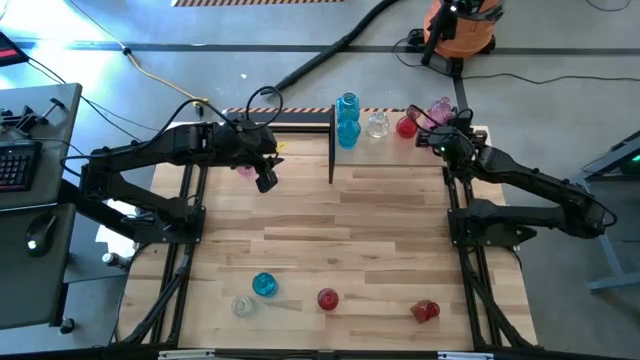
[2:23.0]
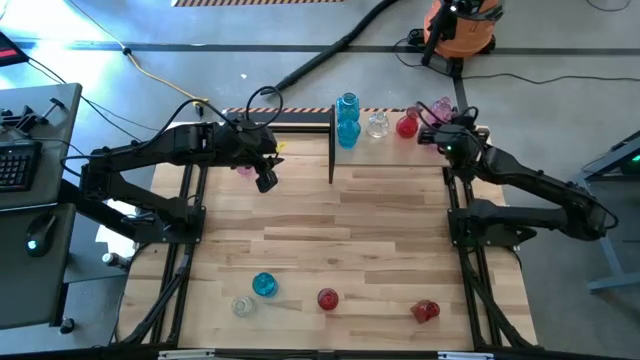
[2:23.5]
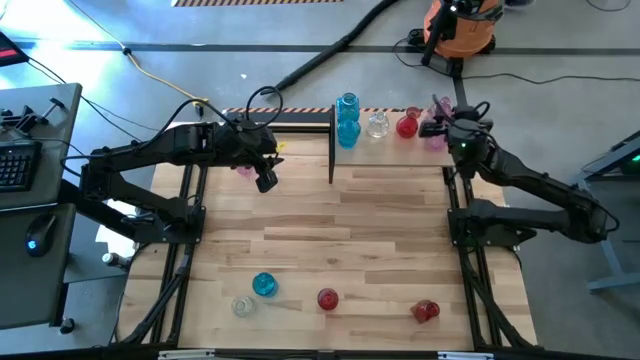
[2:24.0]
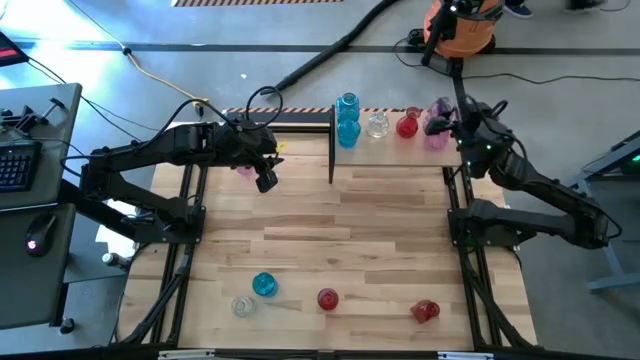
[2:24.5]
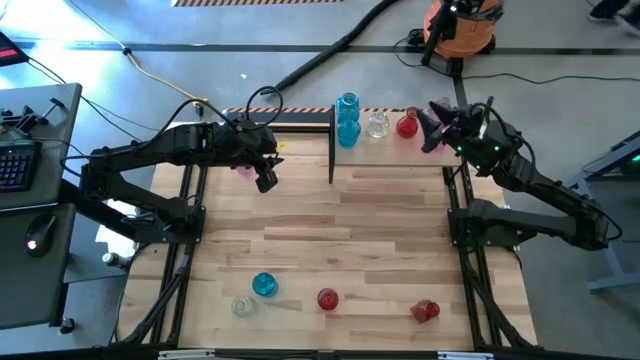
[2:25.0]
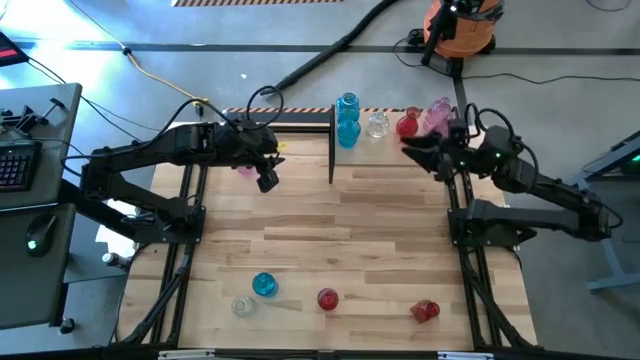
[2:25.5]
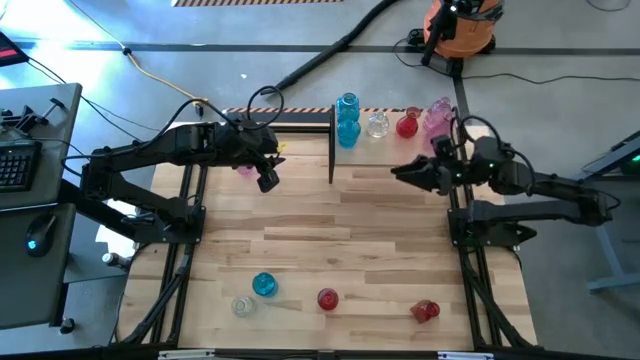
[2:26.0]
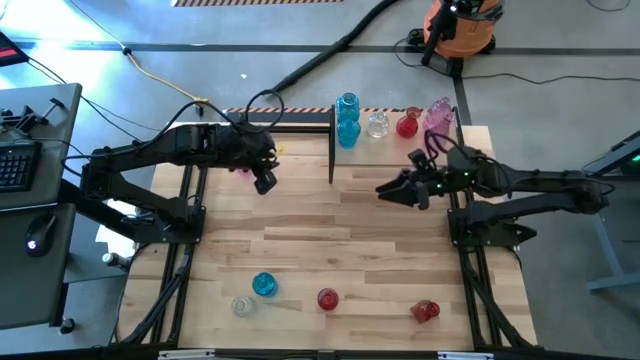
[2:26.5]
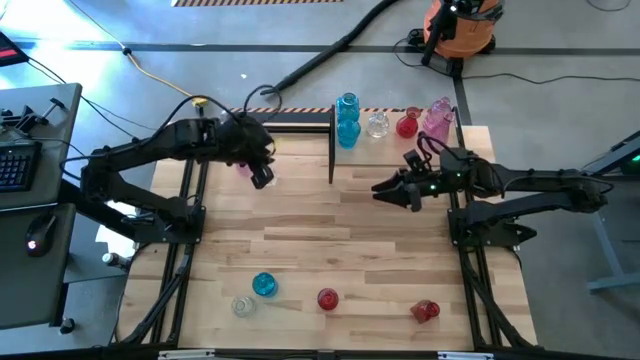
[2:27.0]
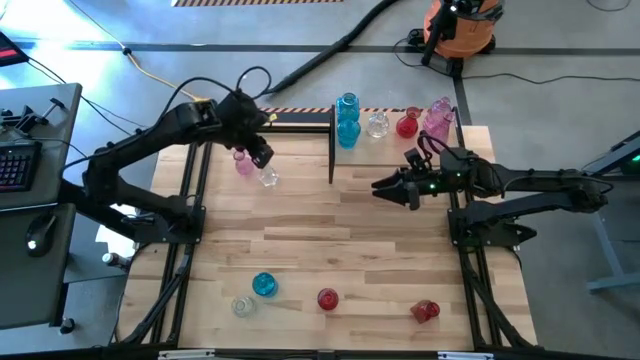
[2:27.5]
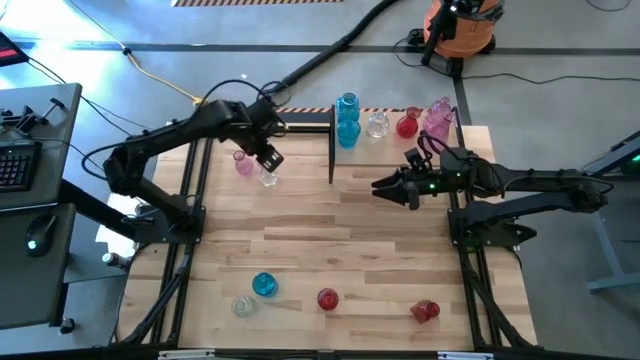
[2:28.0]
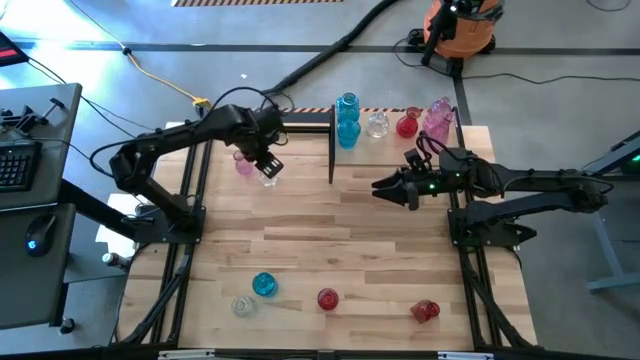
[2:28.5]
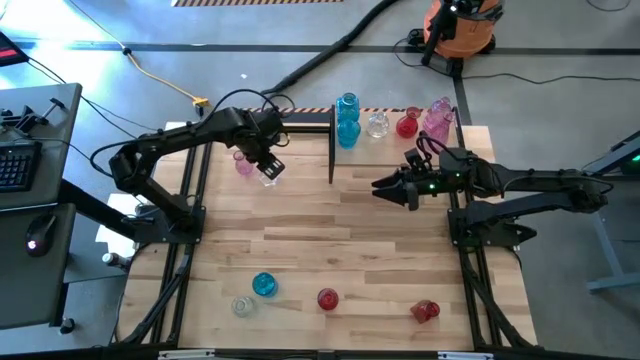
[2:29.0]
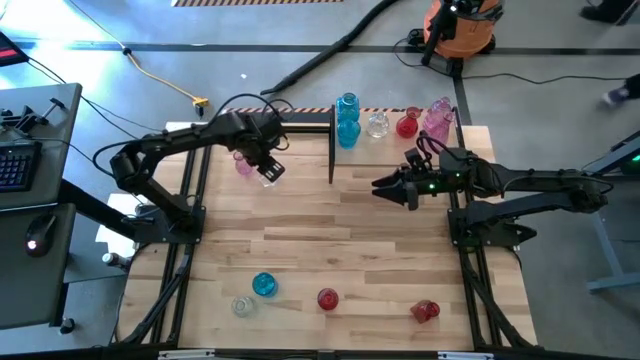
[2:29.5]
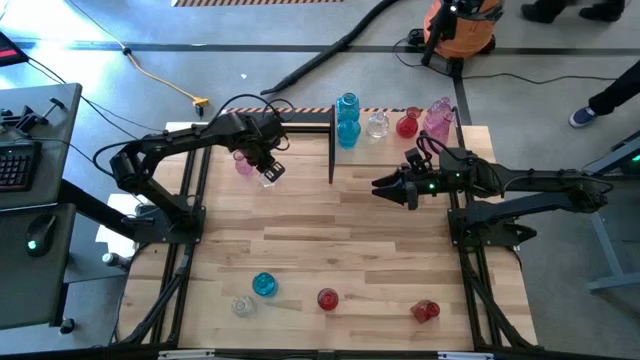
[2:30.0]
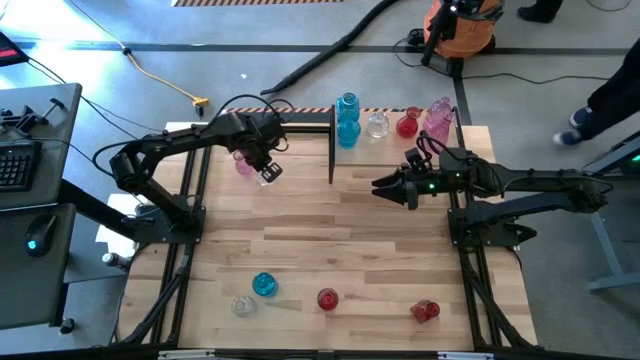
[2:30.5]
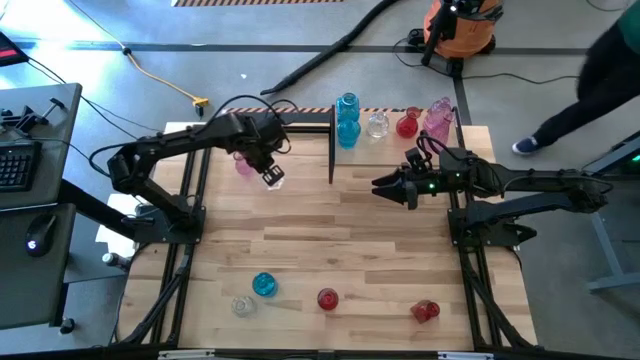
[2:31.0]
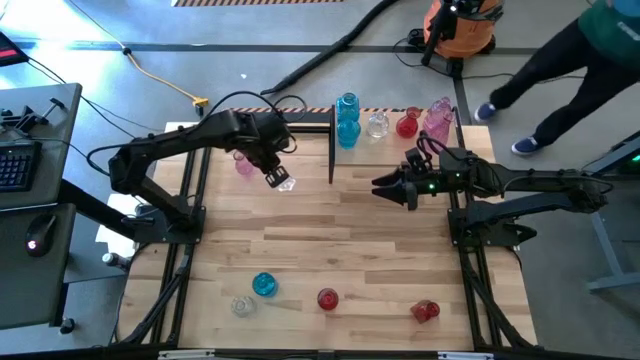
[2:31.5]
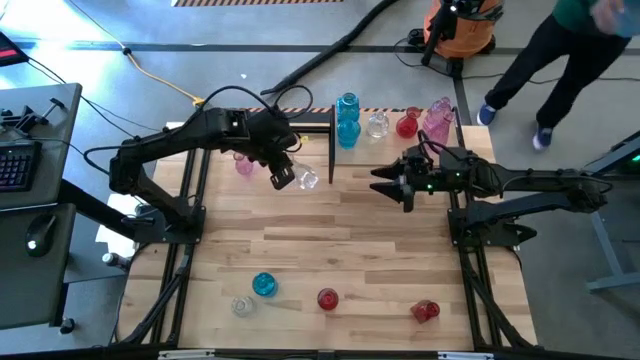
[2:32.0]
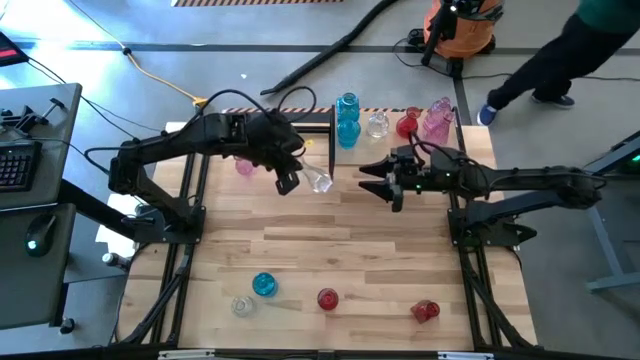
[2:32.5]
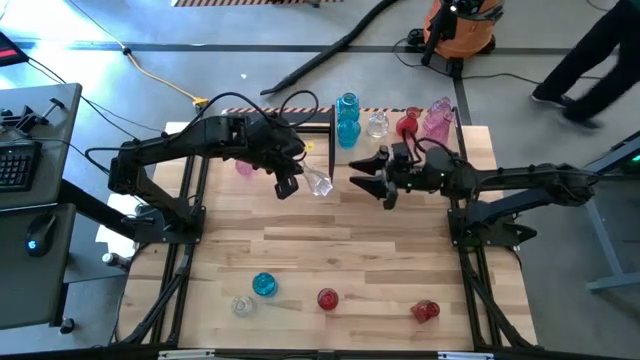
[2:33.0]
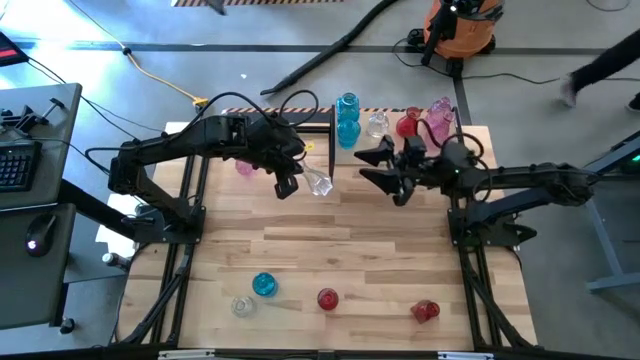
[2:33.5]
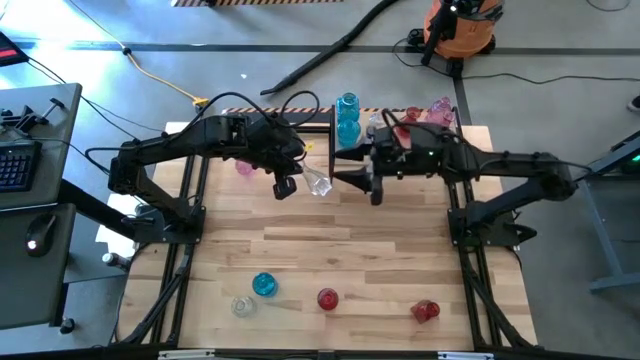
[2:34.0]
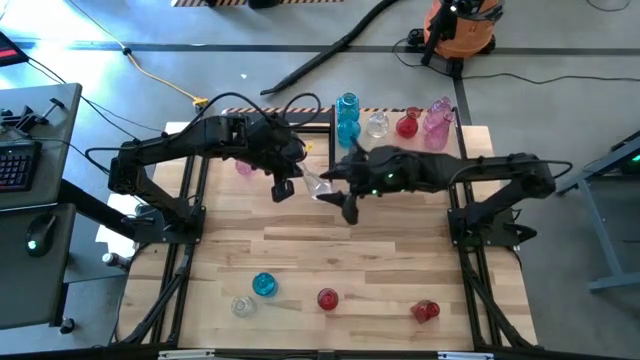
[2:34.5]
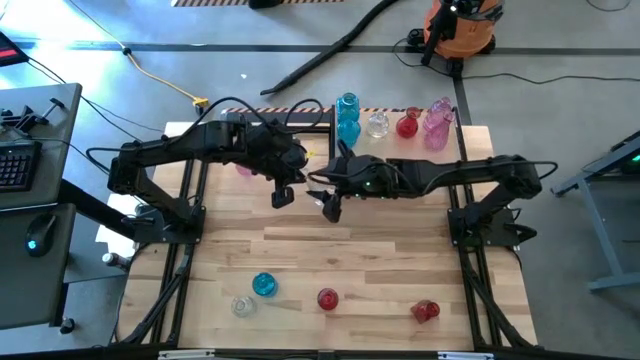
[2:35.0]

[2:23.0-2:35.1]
Task: sort vases onto shelf
Put the top transparent vase on the shelf aligned with the other transparent vase

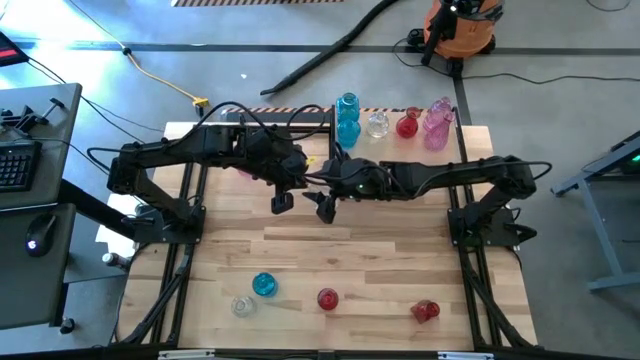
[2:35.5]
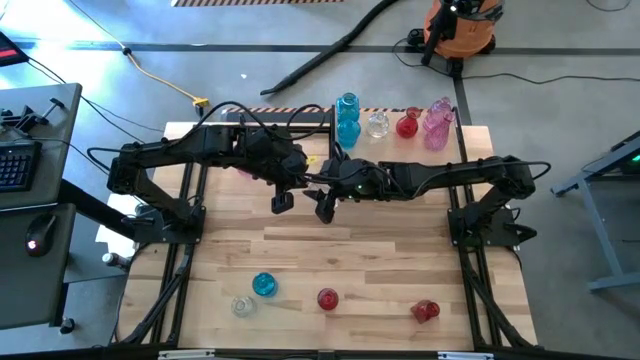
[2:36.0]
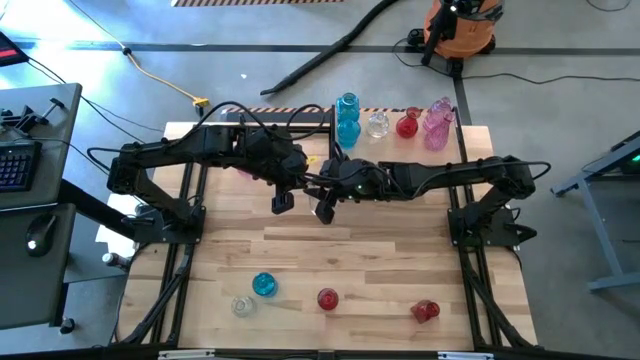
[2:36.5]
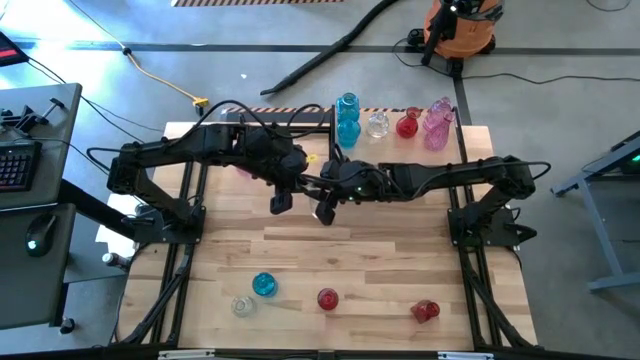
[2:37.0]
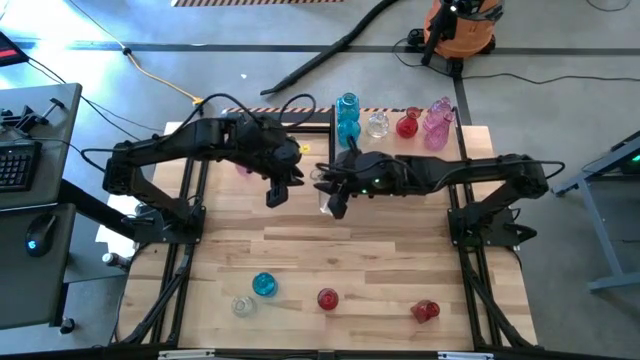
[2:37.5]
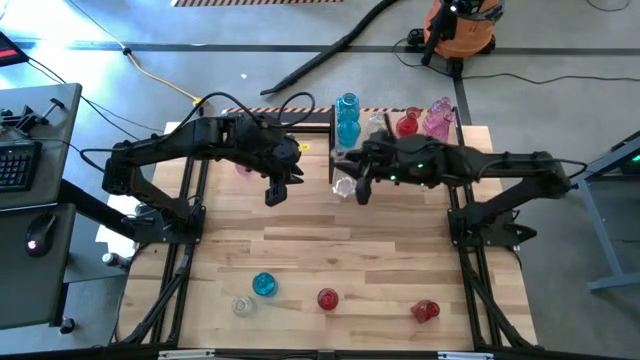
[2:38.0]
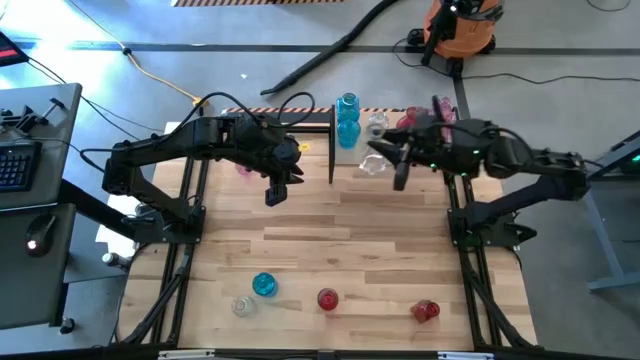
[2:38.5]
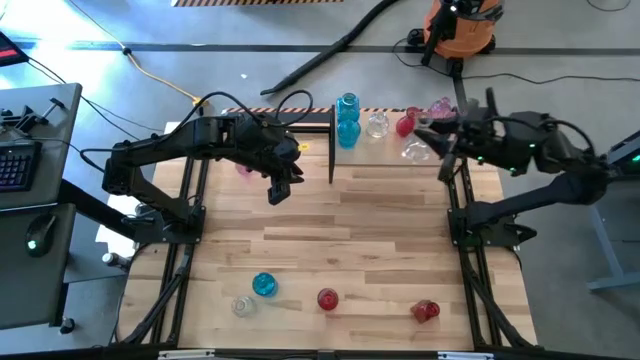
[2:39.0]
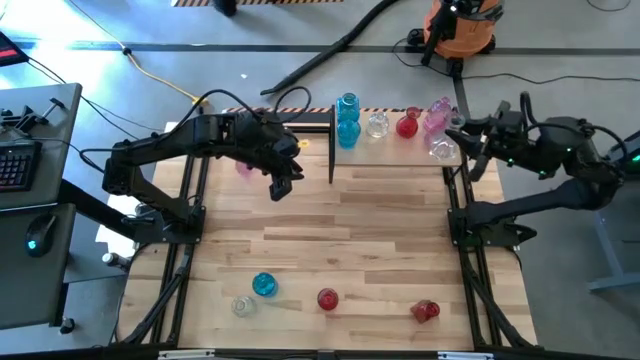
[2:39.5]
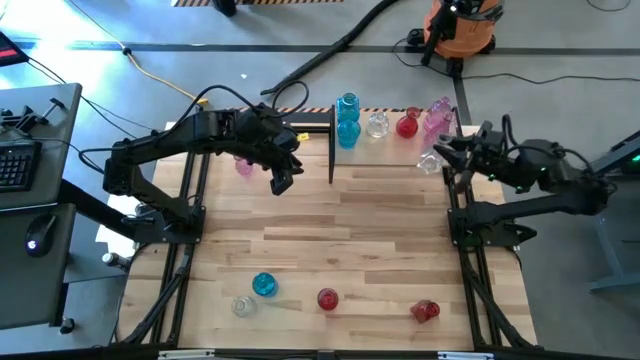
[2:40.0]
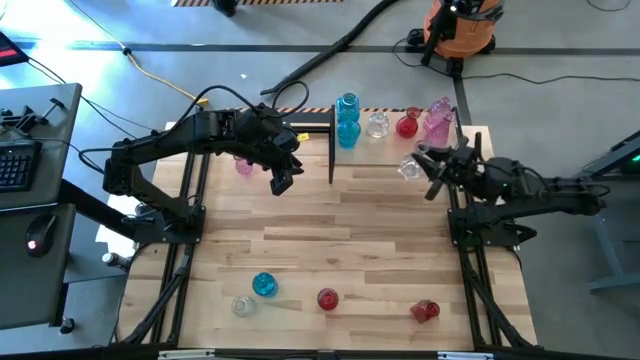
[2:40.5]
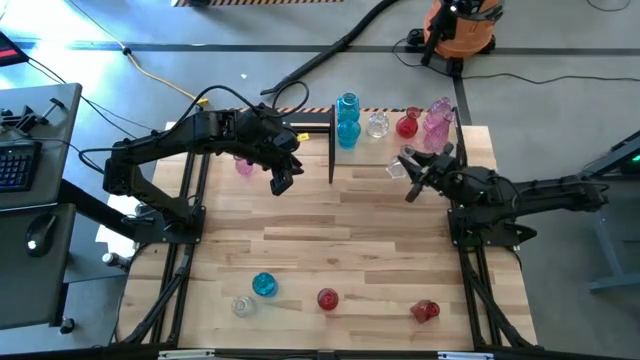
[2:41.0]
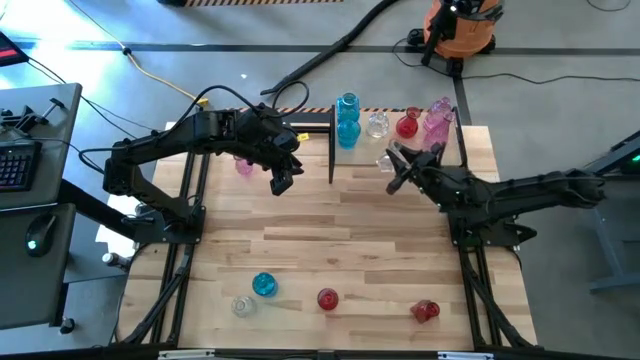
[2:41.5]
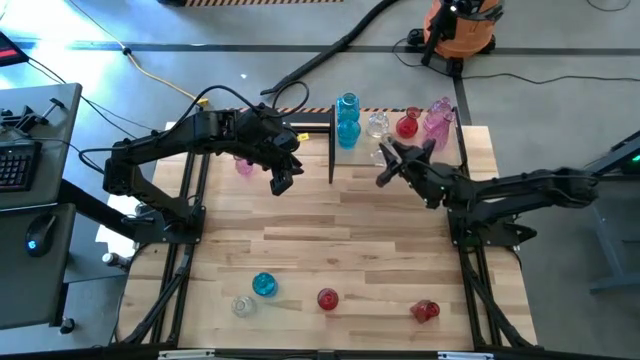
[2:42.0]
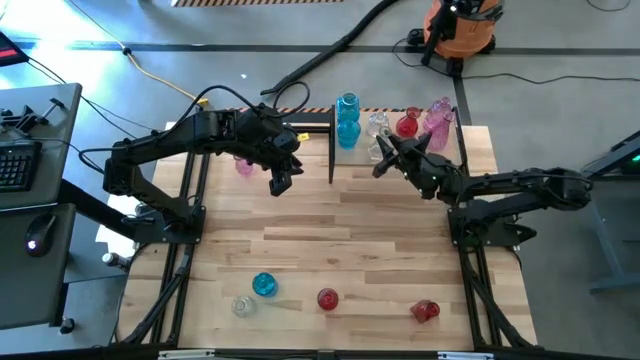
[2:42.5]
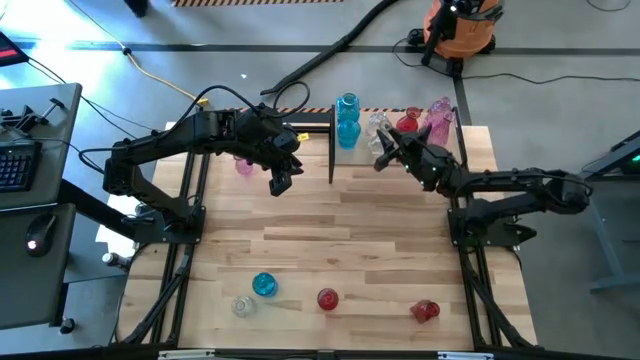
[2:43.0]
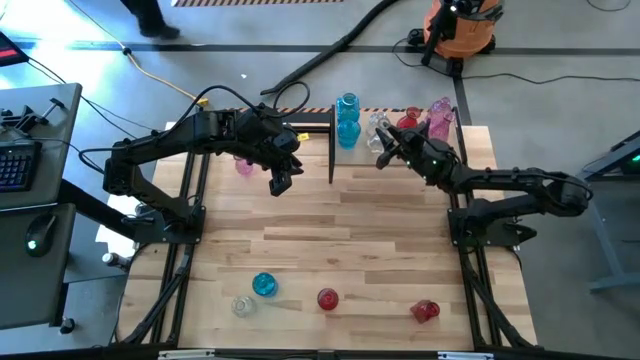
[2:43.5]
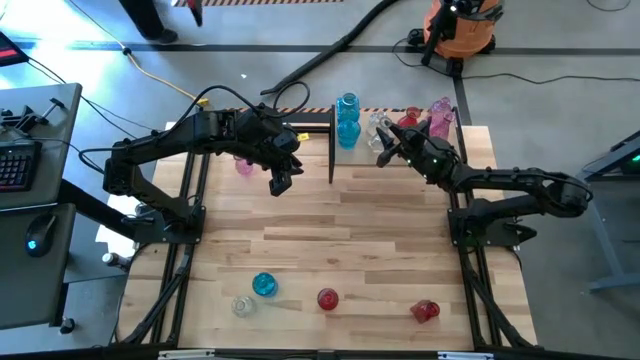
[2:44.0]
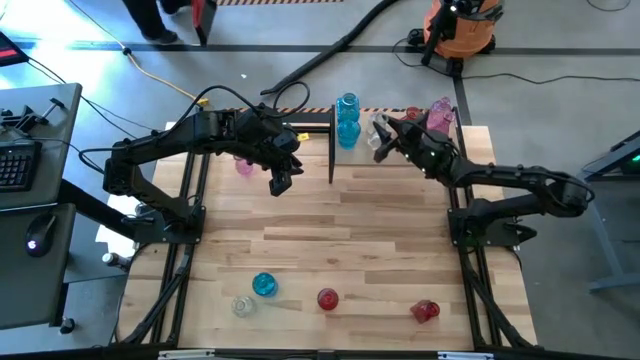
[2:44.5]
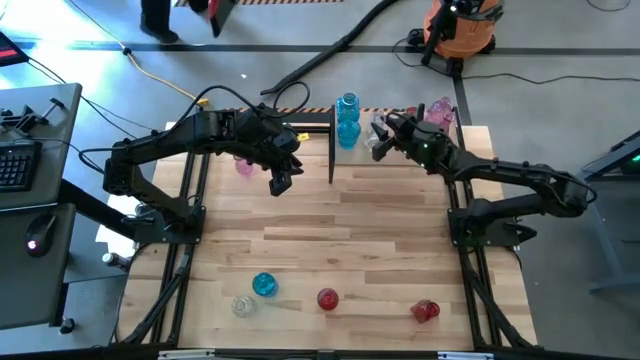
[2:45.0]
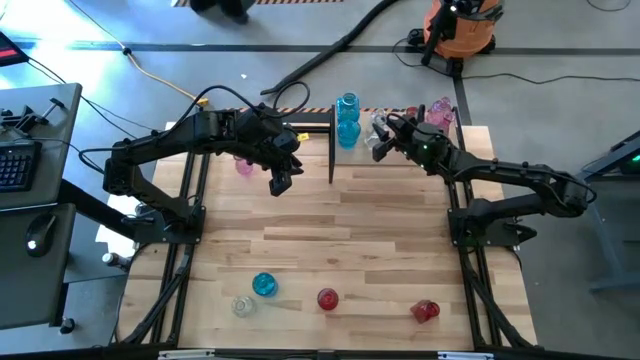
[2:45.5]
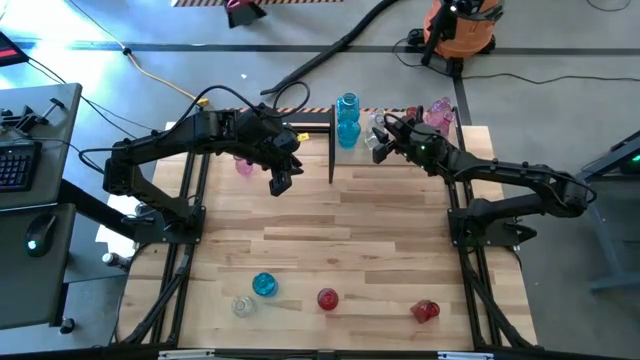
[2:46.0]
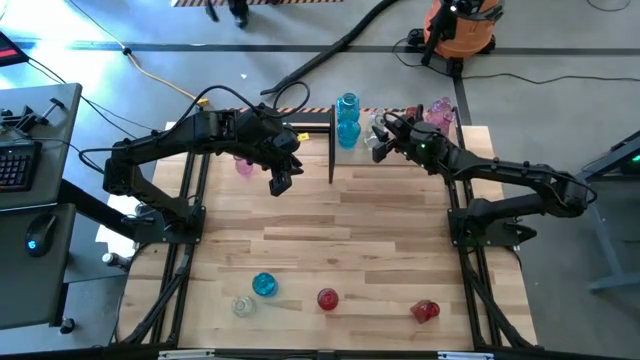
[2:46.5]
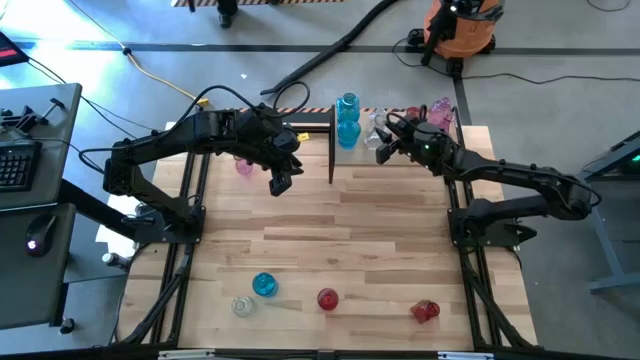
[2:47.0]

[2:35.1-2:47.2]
Put the top transparent vase on the shelf aligned with the other transparent vase
